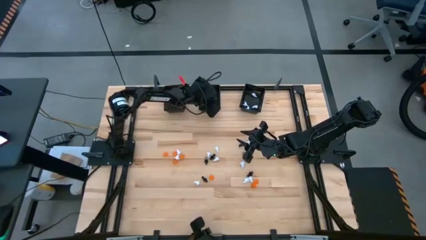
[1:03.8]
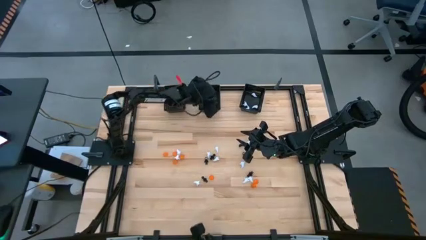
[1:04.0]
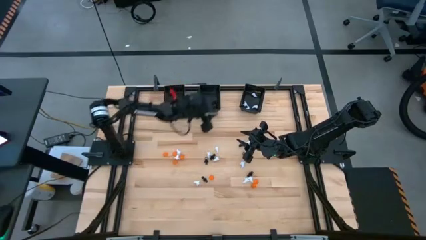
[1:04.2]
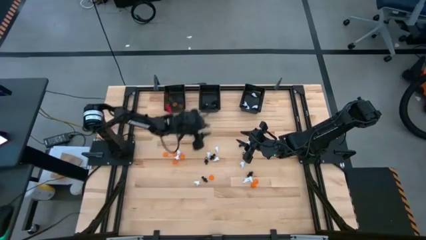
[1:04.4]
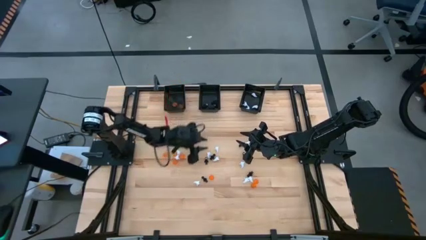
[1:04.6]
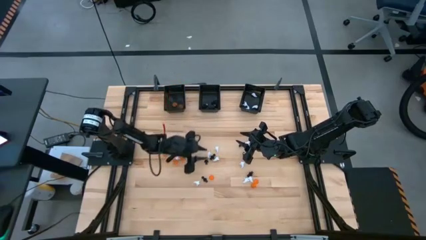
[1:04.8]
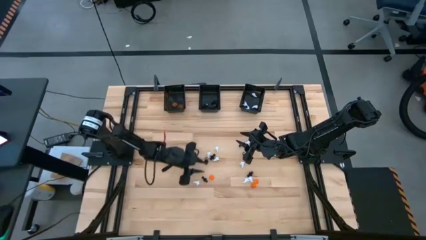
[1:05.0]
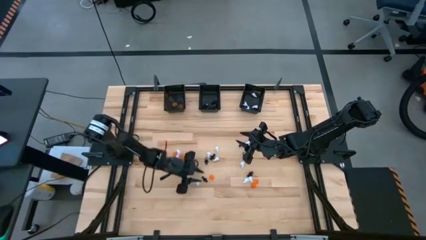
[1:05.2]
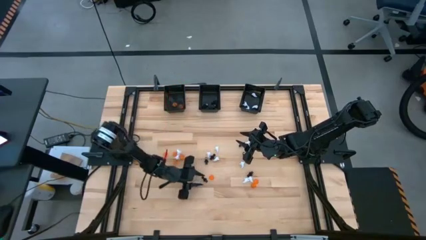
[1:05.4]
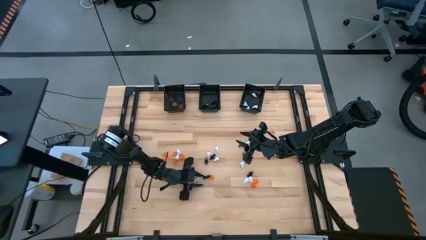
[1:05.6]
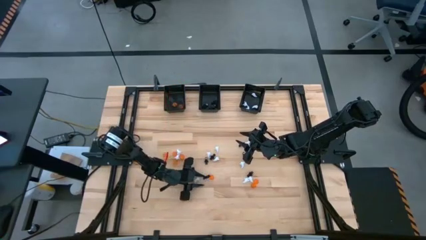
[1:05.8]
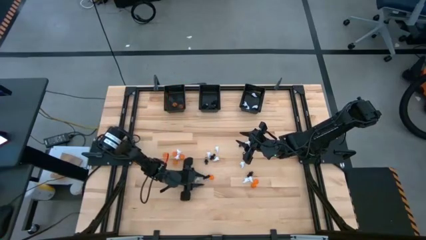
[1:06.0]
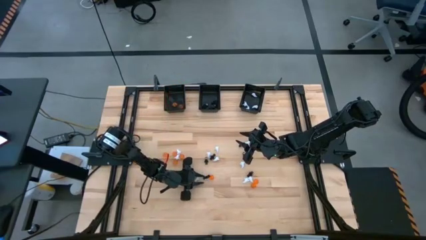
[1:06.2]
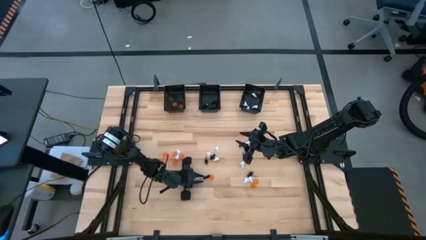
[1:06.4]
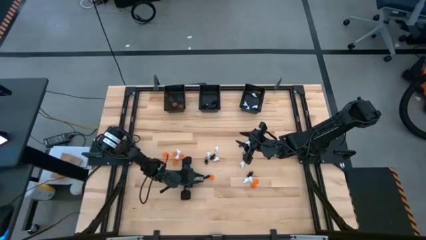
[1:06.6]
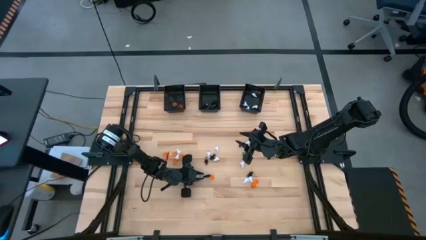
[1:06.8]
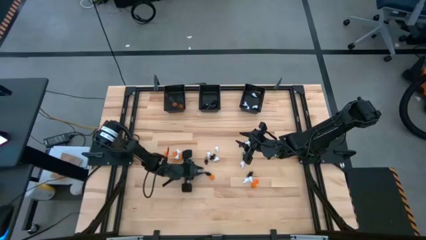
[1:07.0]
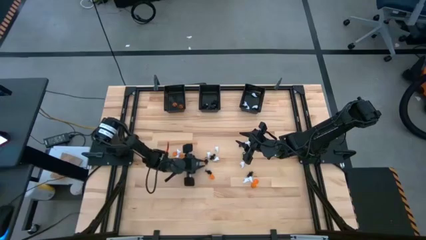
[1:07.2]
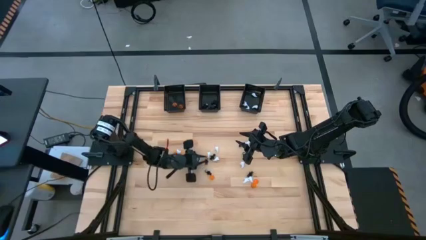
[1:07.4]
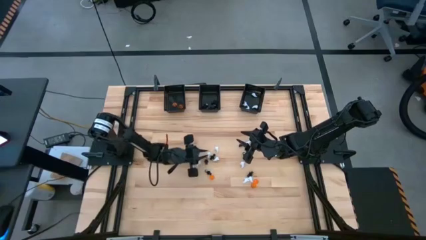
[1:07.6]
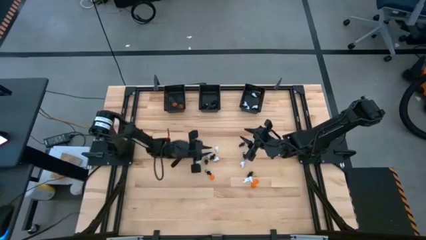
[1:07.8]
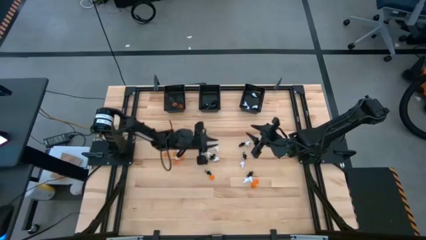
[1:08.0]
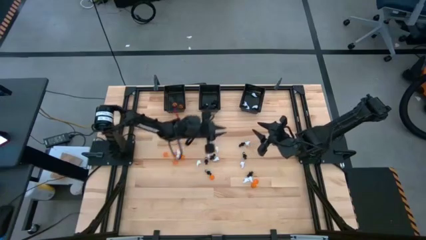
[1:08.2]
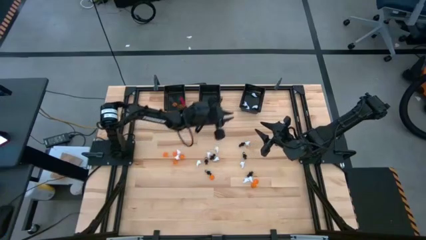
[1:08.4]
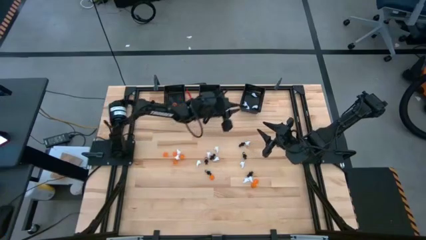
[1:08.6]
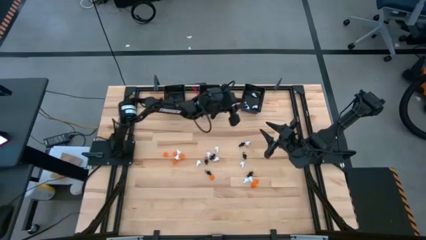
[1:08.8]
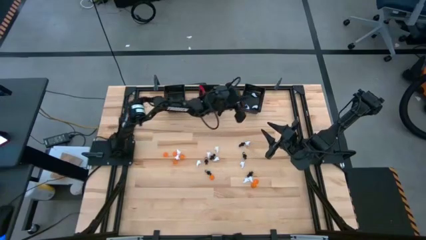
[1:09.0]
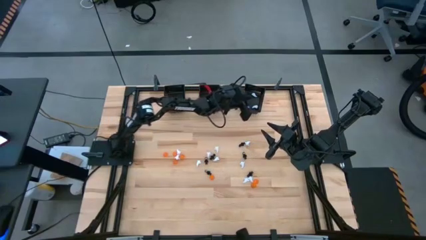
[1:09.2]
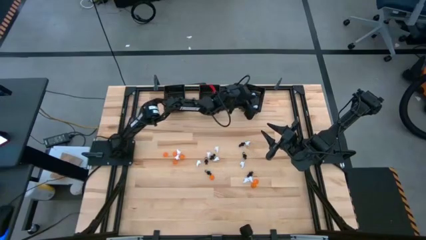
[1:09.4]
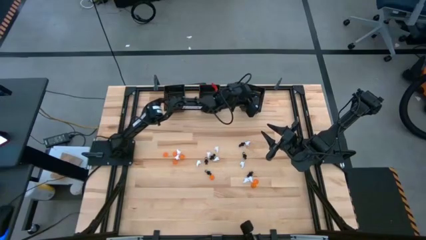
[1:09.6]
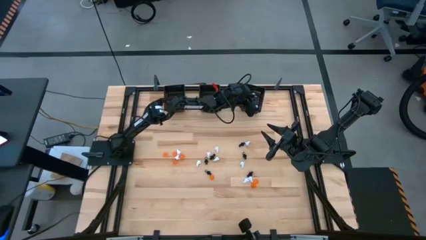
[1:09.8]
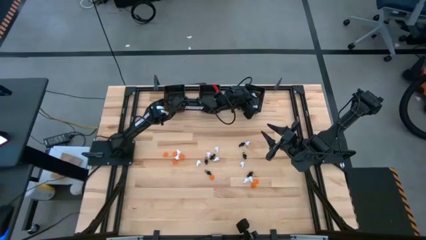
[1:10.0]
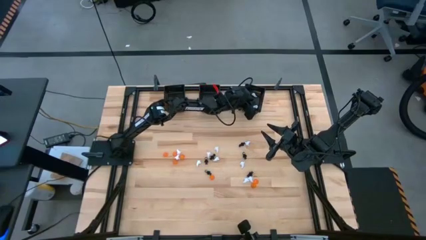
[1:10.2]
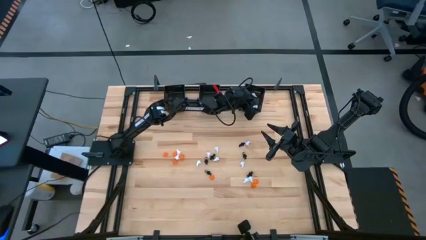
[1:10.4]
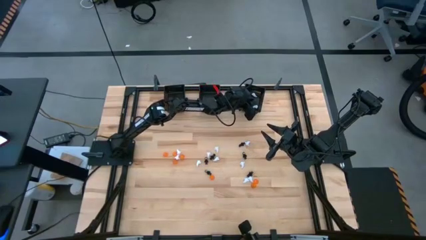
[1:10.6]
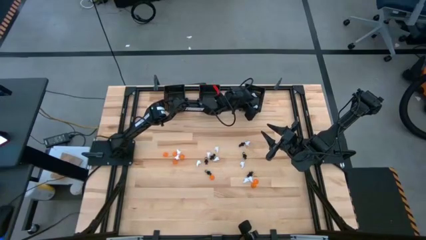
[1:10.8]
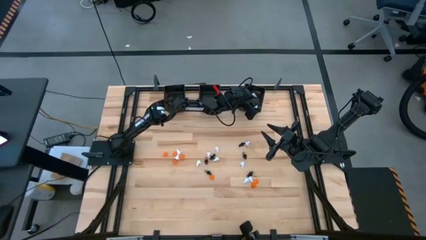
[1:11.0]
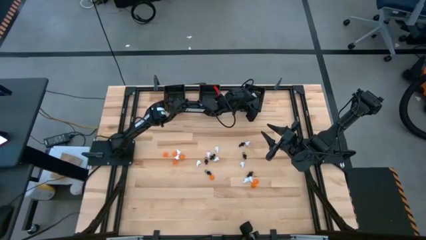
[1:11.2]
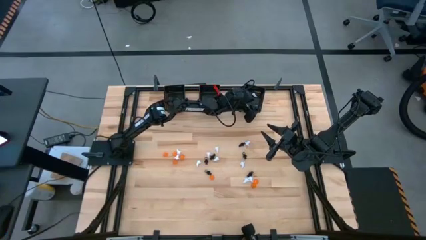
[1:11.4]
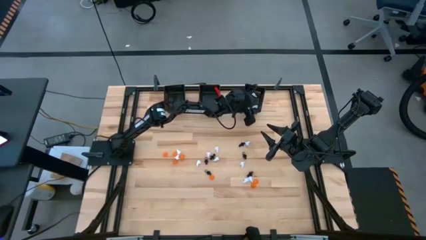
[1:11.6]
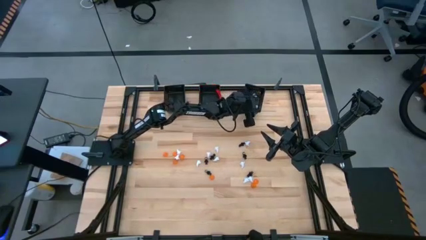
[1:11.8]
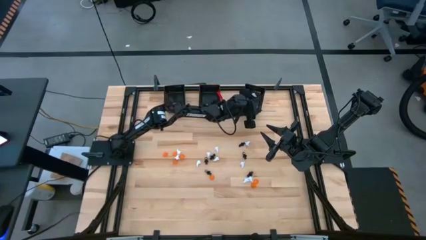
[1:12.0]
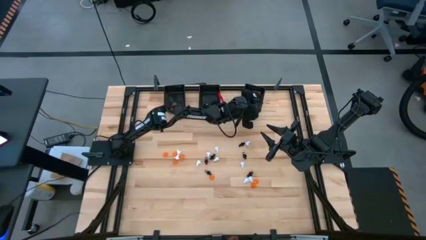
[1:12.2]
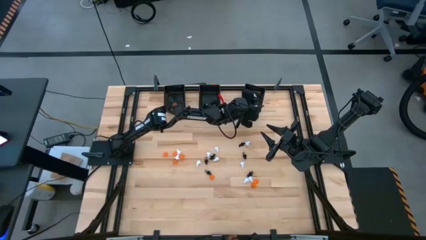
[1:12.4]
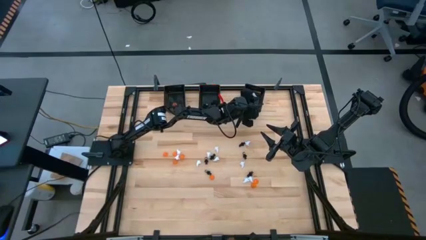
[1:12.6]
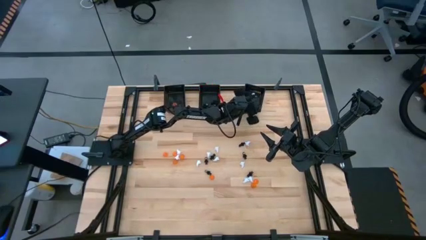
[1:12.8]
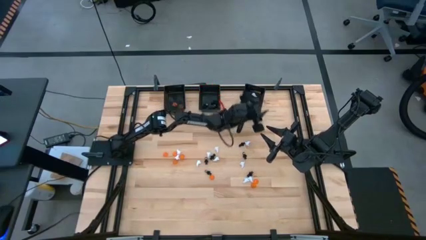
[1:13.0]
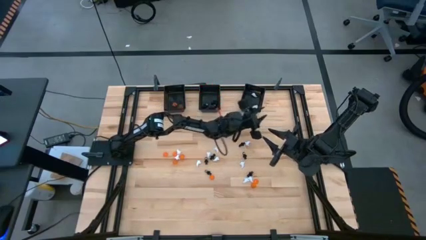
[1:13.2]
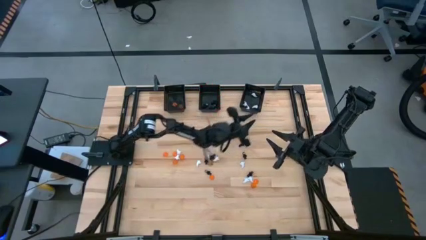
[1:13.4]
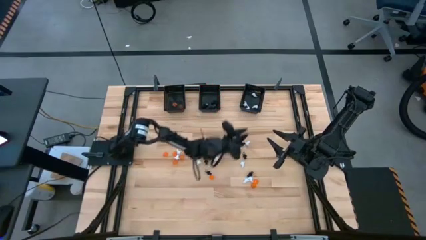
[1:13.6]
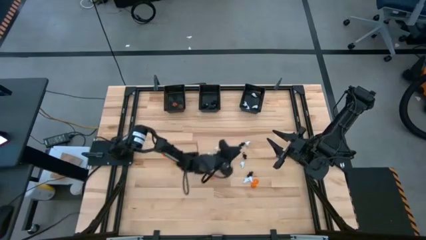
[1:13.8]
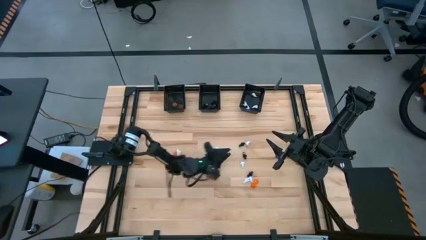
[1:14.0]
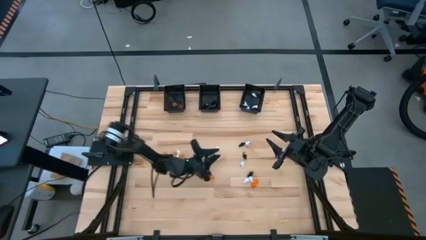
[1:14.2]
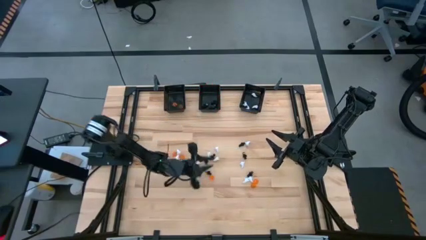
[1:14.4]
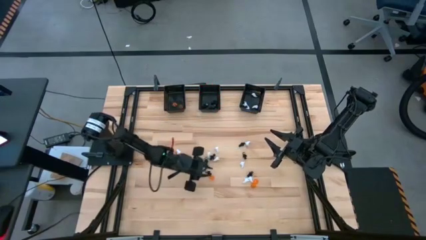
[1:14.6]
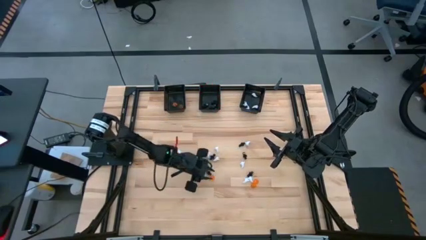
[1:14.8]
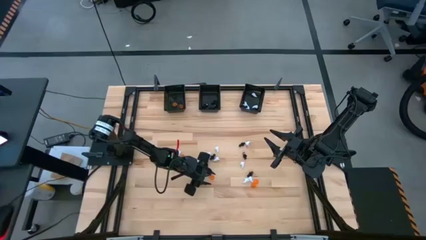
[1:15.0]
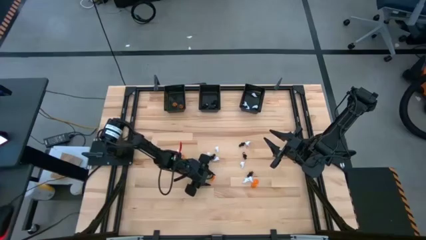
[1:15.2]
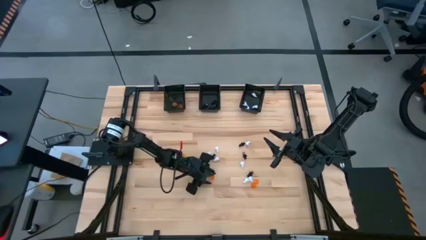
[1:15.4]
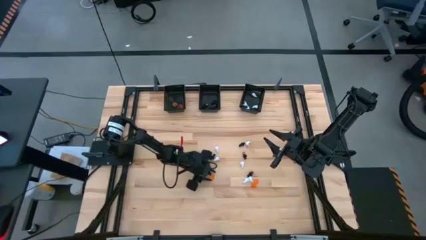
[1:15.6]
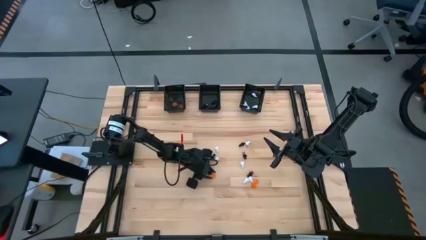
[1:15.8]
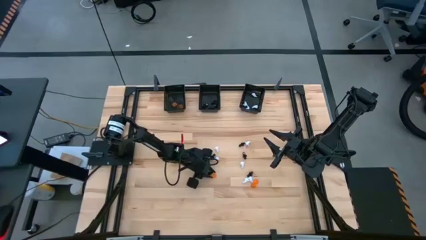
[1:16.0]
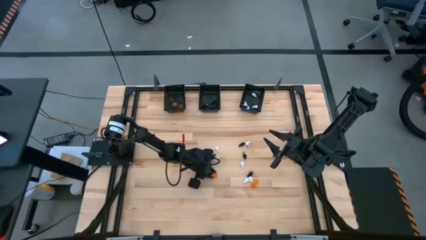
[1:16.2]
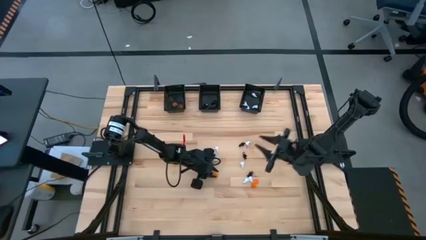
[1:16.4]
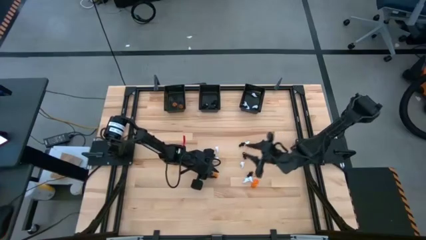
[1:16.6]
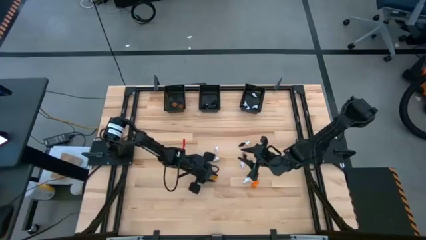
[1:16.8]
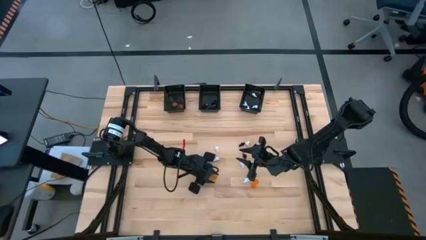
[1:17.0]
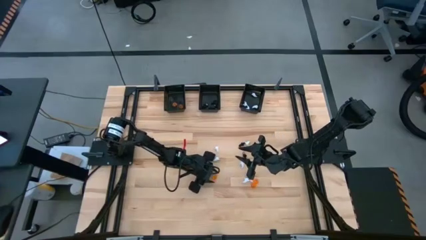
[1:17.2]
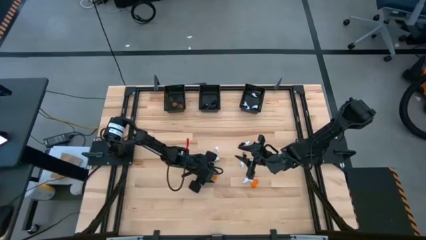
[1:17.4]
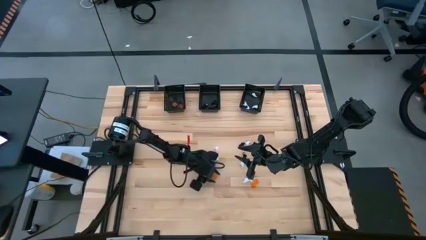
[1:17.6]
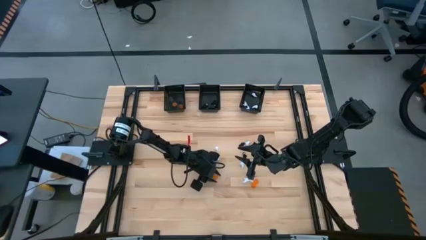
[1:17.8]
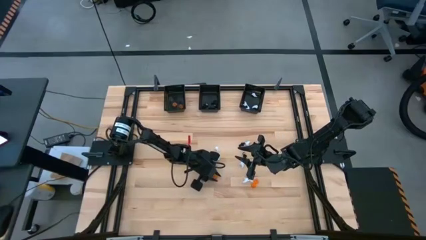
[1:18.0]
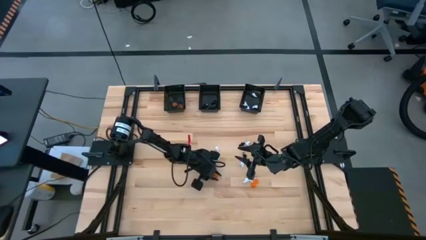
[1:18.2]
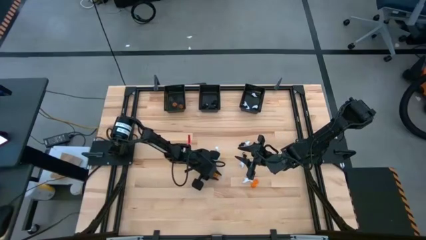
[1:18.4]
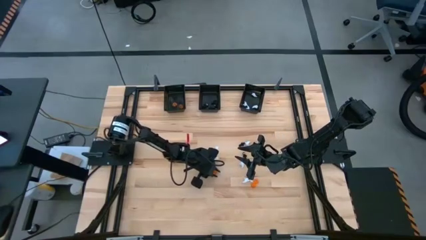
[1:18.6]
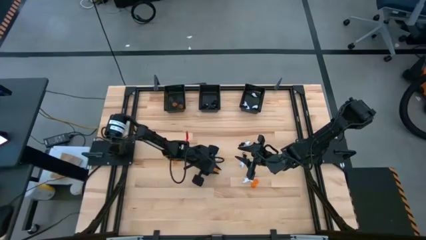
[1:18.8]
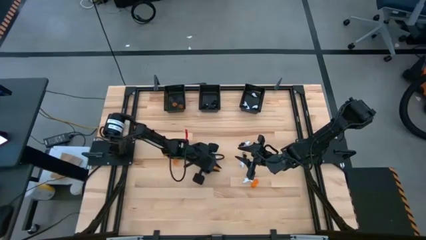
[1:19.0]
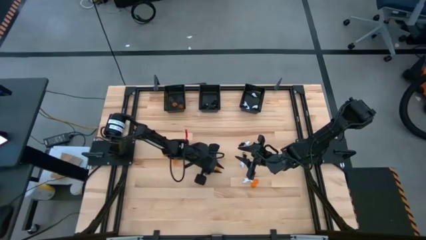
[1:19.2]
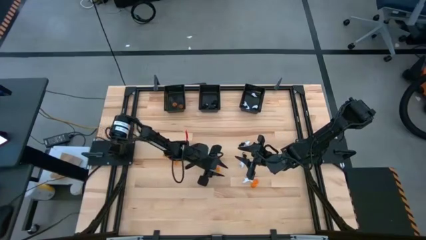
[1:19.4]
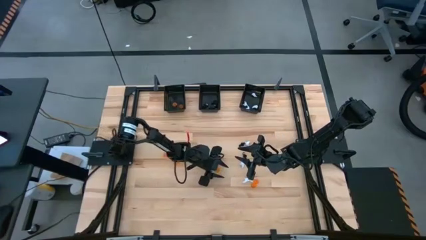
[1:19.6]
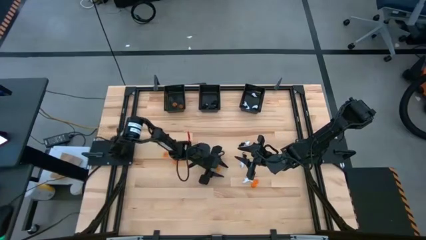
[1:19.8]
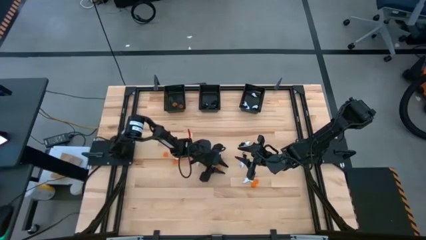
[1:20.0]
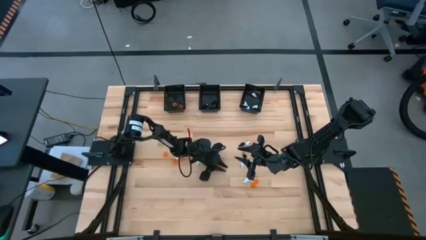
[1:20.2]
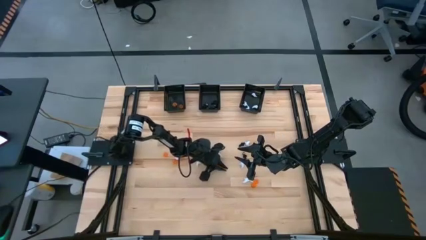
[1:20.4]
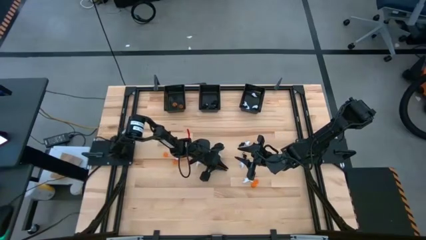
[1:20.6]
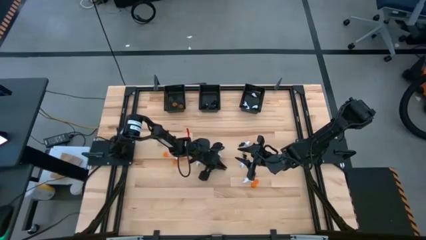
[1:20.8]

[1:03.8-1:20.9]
Task: Sort Halloween decoration
Put the white ghost toy into the right black basket
